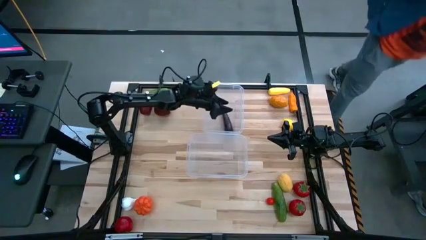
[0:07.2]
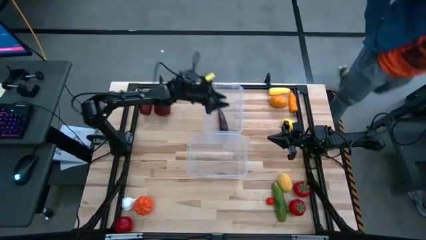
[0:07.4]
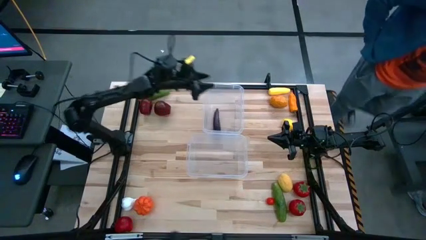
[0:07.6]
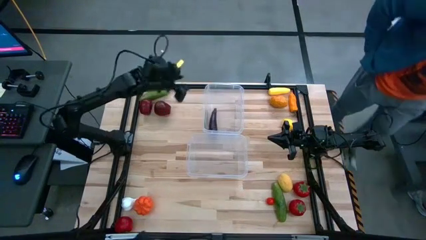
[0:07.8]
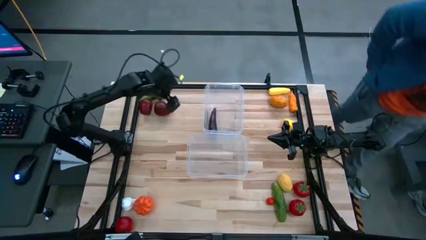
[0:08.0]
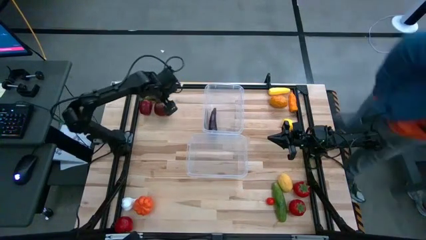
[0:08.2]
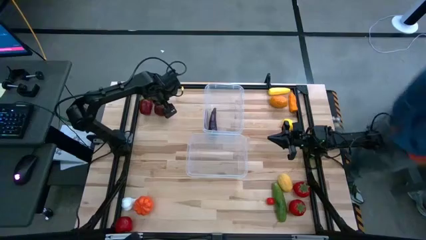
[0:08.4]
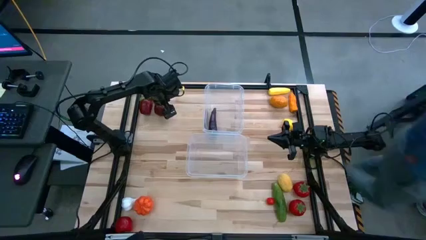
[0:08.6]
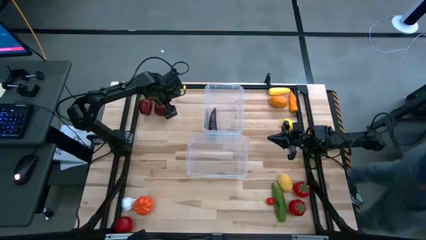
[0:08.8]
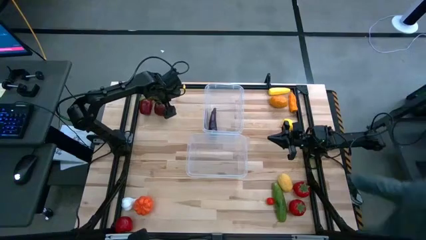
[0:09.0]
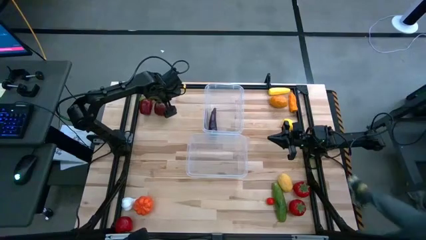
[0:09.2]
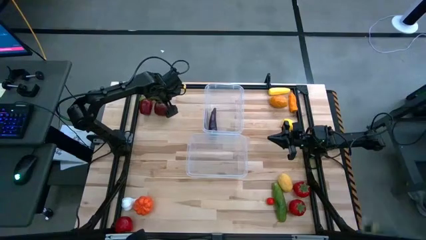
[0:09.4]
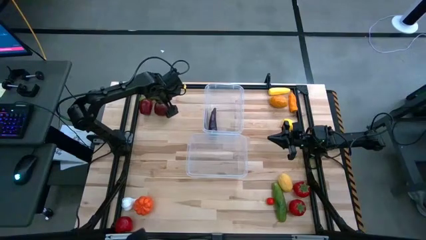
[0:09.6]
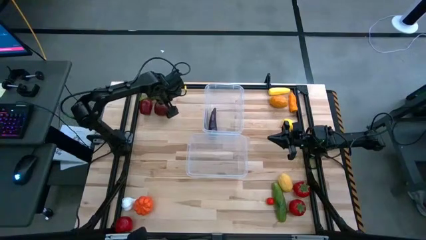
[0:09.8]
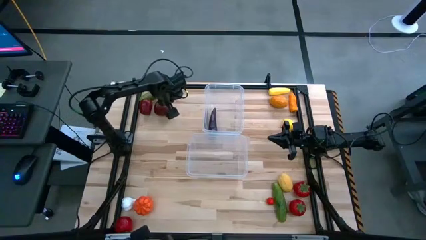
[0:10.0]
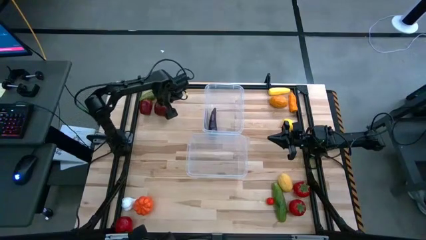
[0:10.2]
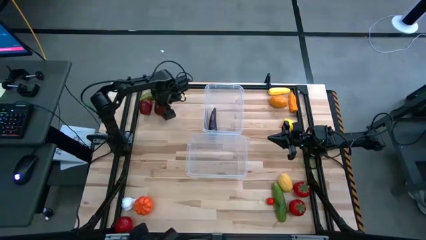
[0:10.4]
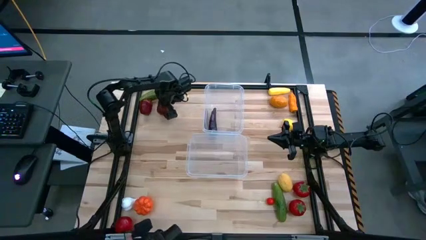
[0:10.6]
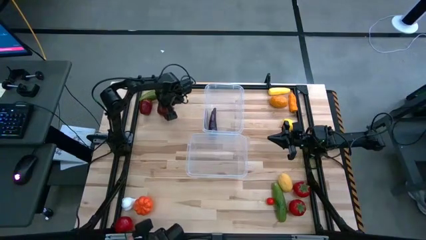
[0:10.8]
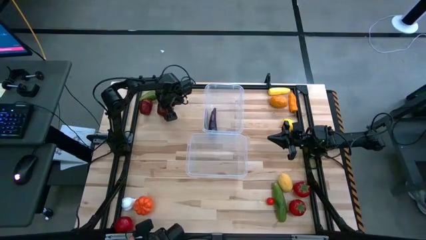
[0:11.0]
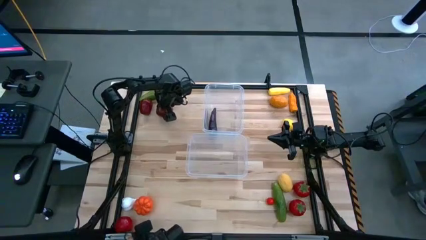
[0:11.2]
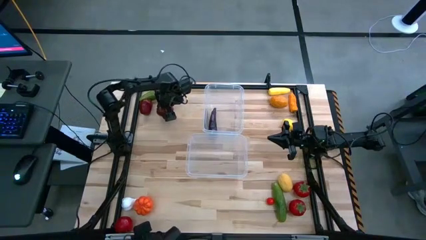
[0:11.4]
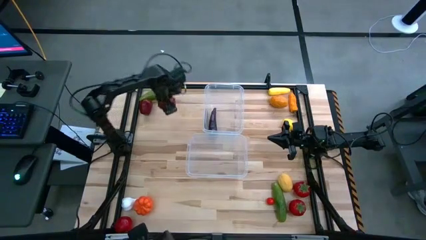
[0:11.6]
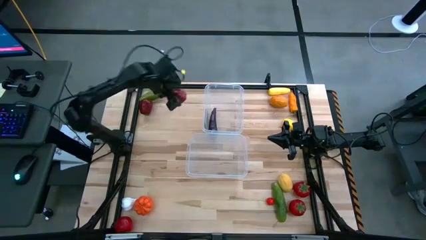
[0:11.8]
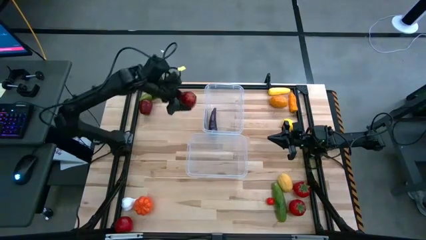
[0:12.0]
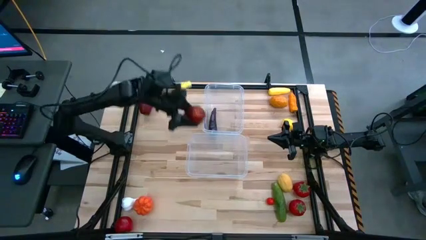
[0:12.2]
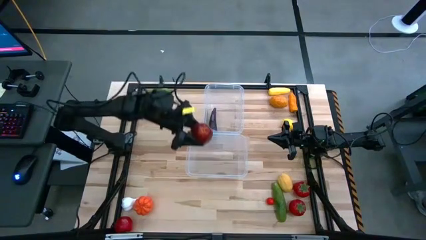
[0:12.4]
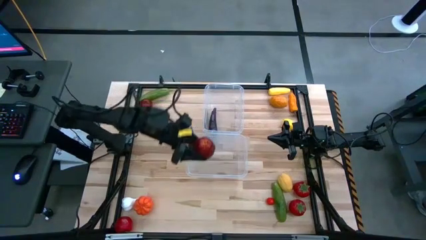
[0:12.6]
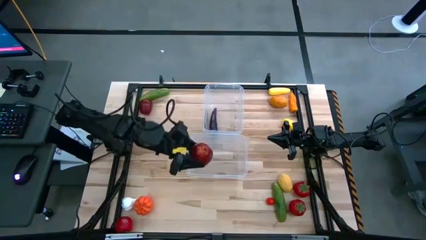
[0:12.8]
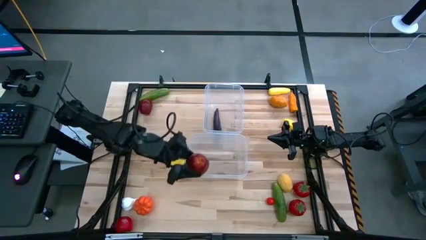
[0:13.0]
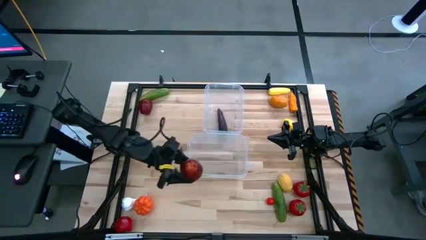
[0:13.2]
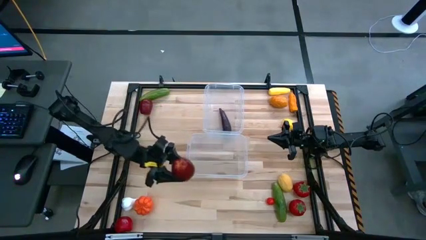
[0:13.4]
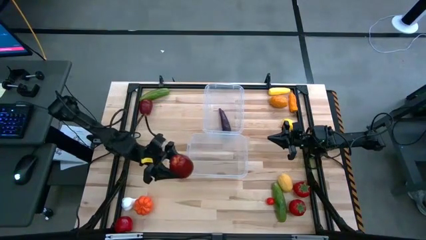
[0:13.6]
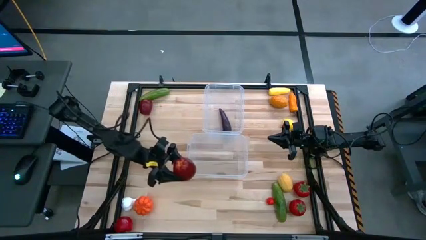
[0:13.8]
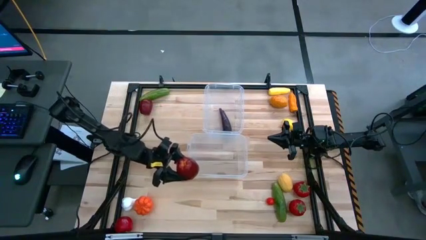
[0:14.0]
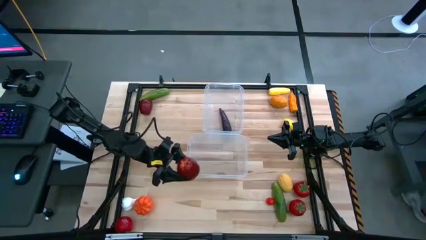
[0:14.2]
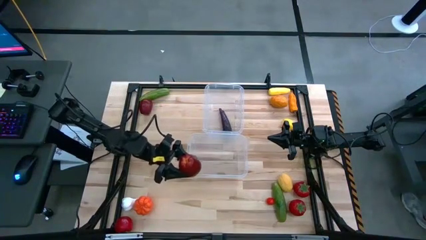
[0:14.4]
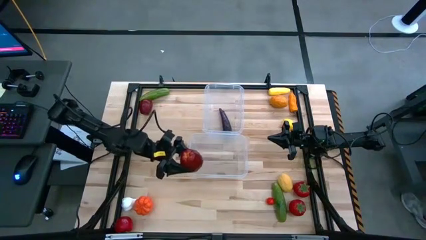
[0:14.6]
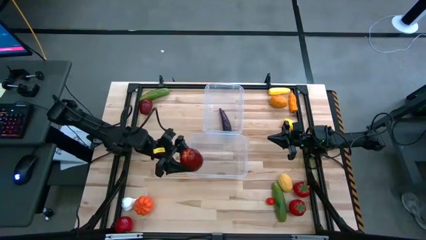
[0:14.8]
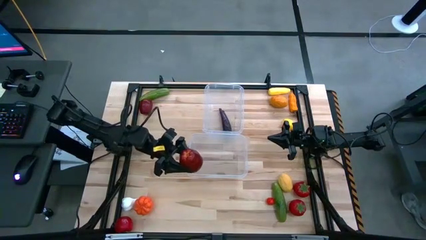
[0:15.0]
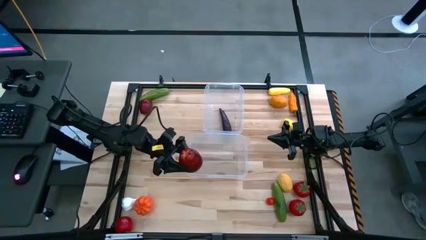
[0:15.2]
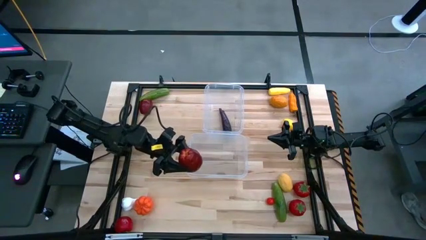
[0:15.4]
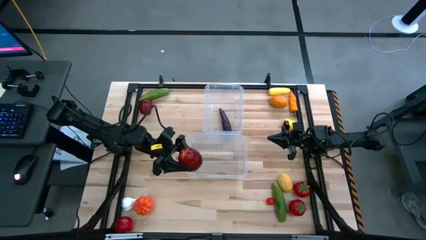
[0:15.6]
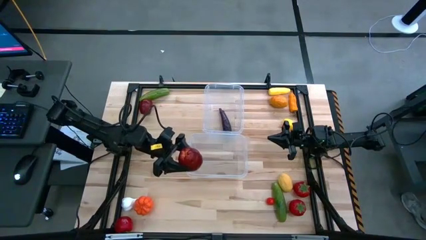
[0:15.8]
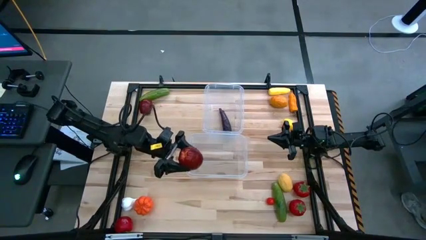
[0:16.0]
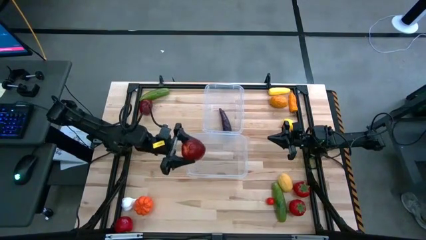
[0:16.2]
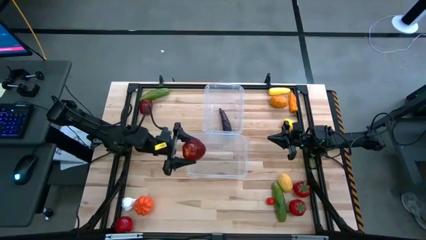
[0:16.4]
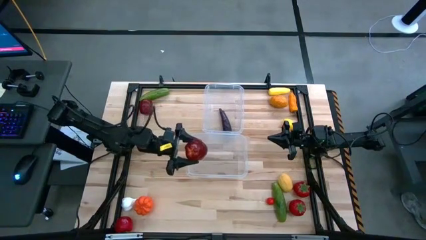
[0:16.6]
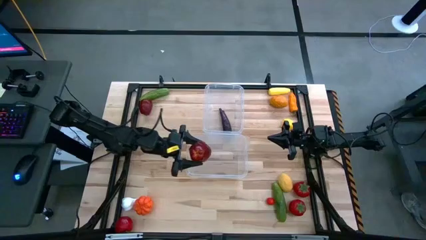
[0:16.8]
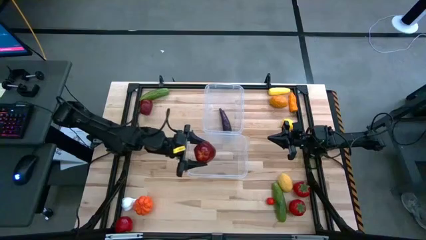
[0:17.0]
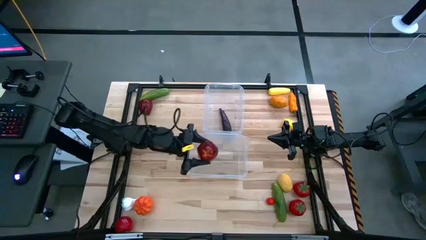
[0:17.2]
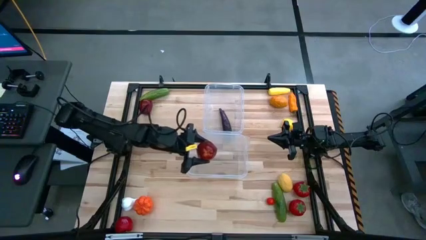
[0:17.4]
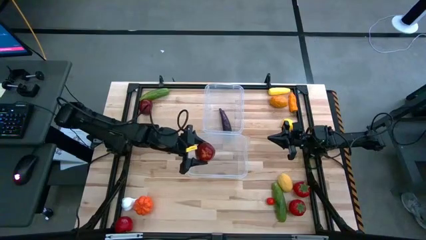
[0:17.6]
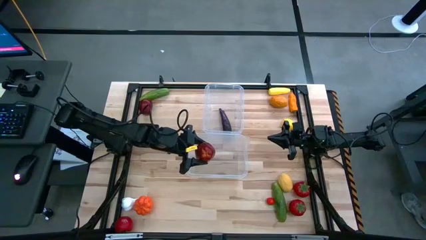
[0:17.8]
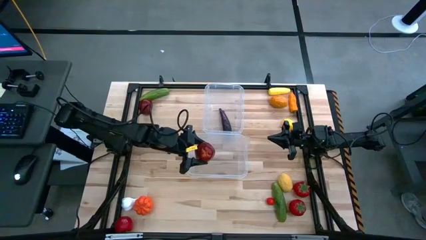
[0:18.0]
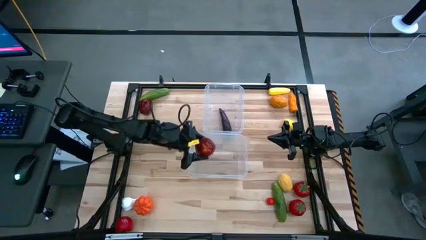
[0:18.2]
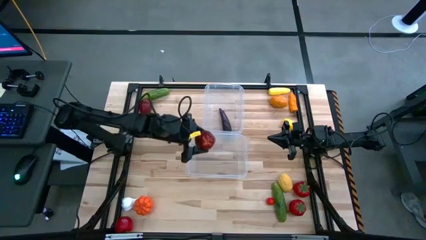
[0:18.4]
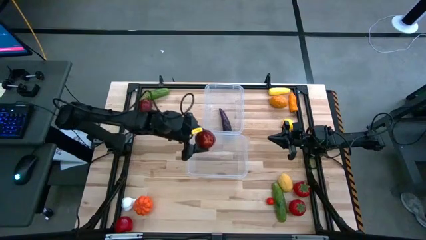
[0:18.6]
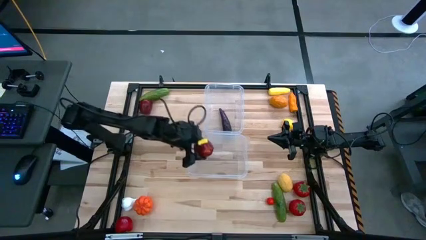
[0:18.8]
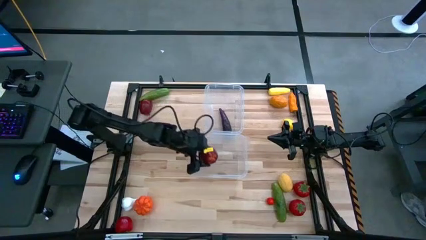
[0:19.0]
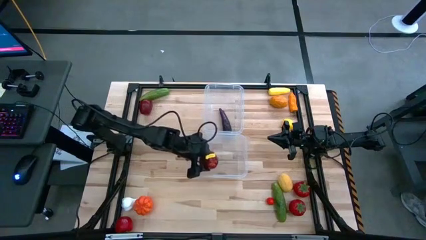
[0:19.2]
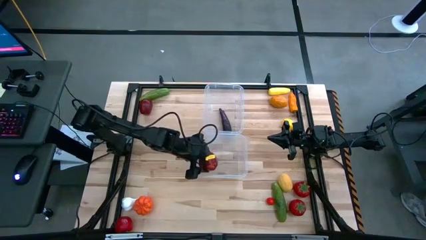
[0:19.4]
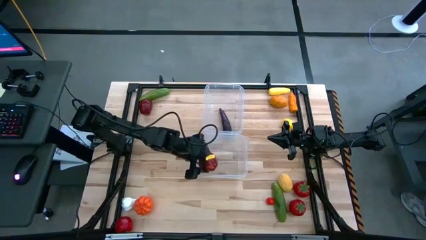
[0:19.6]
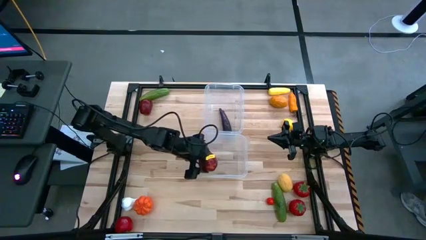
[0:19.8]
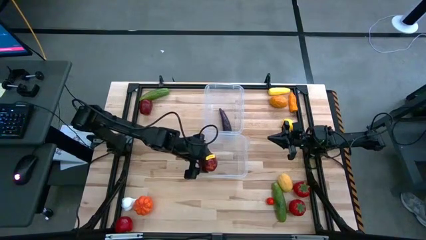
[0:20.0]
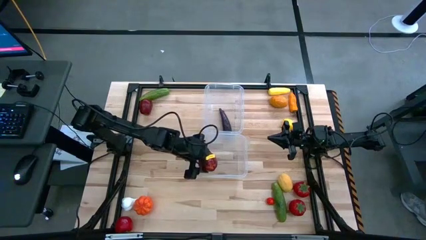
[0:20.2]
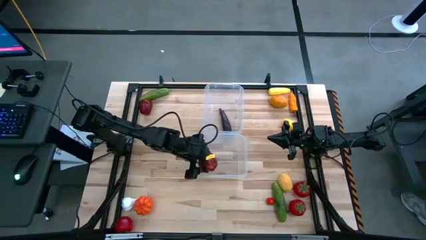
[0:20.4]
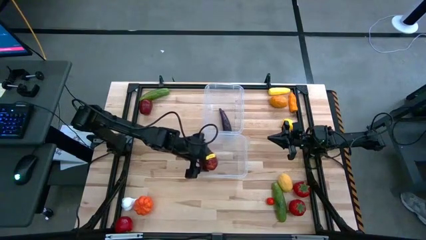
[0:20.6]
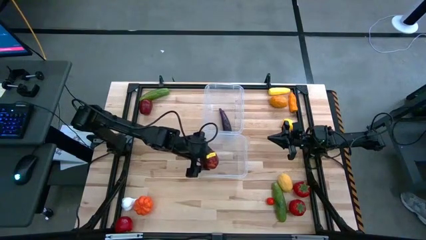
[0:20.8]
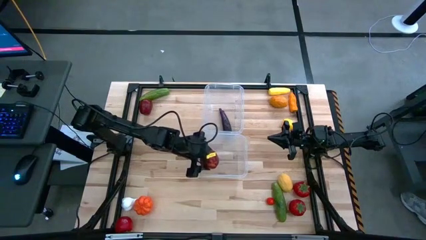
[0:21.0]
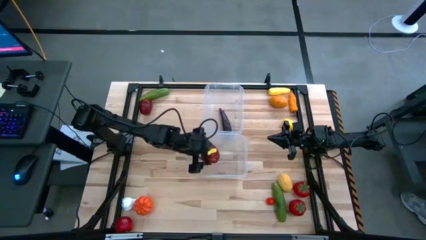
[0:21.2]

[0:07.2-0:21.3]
Task: Sort produce into baskets
Put the red apple into the bottom transparent bin
